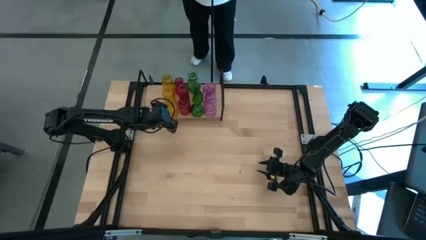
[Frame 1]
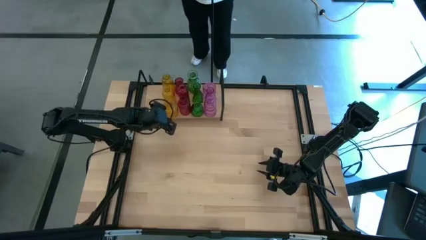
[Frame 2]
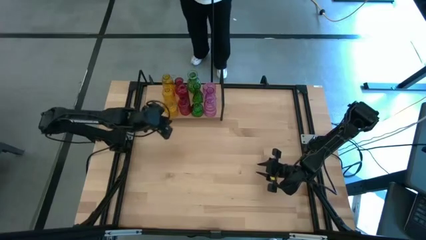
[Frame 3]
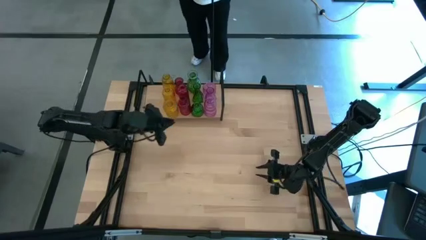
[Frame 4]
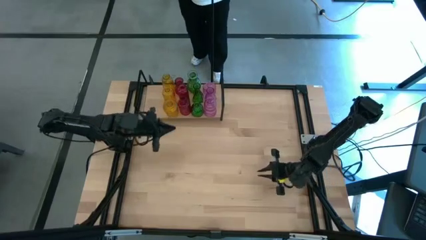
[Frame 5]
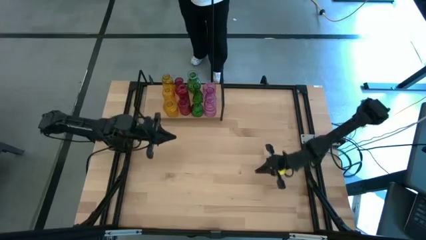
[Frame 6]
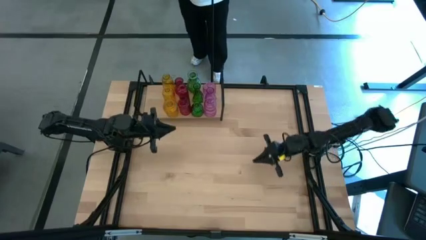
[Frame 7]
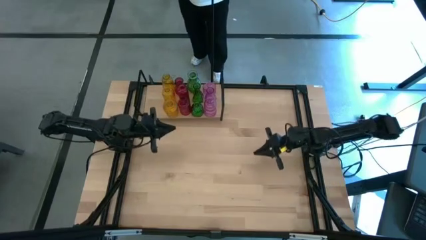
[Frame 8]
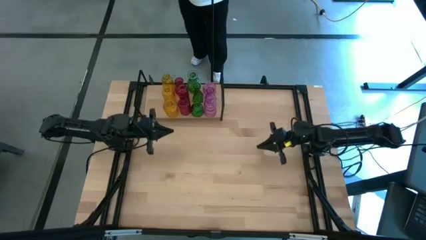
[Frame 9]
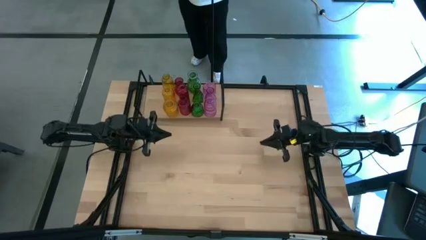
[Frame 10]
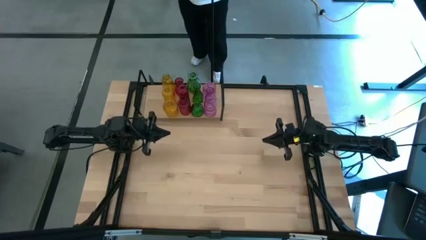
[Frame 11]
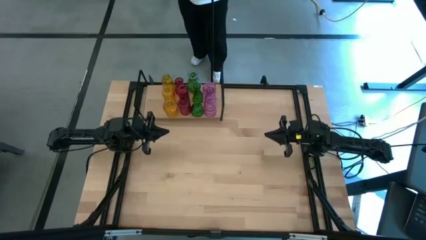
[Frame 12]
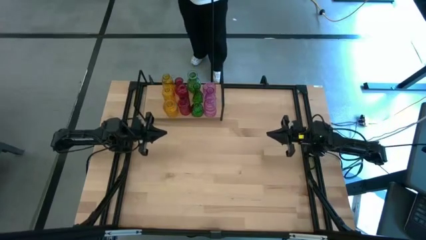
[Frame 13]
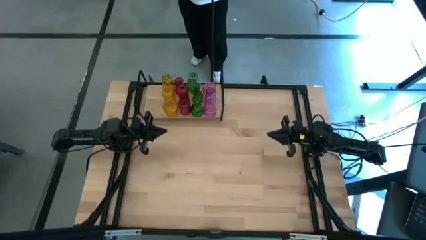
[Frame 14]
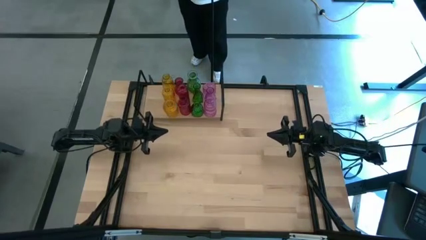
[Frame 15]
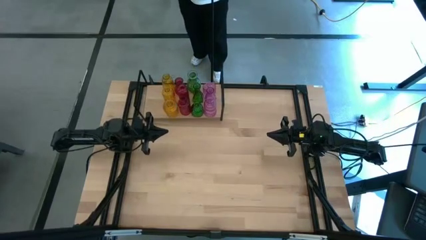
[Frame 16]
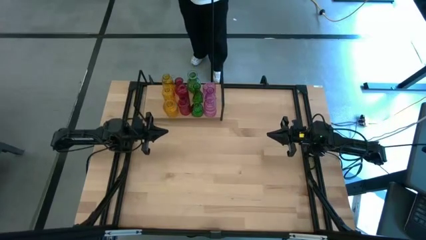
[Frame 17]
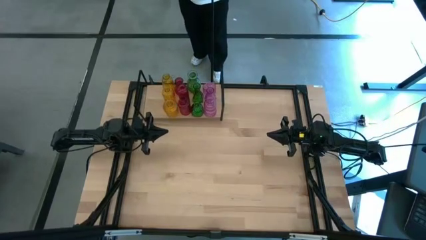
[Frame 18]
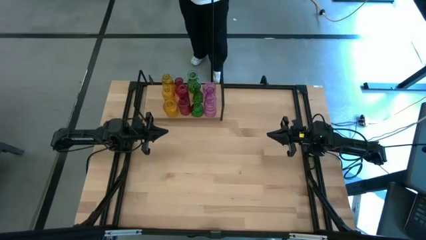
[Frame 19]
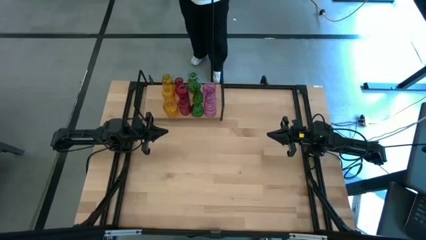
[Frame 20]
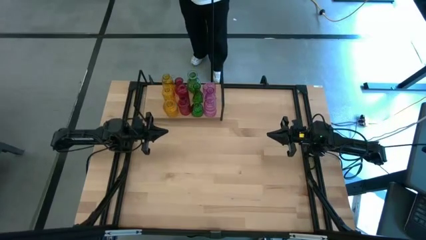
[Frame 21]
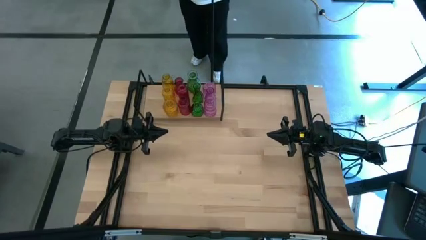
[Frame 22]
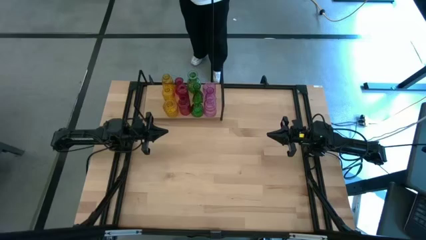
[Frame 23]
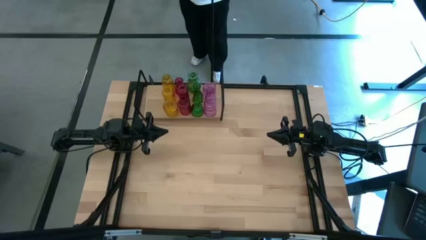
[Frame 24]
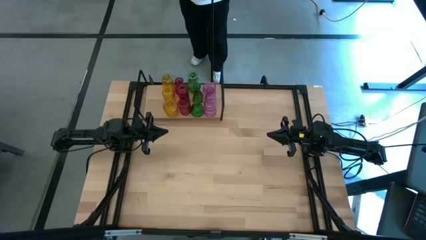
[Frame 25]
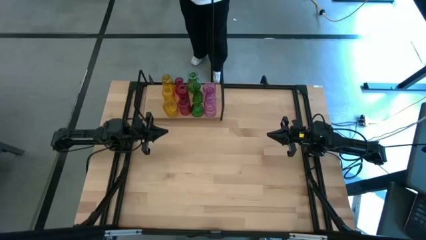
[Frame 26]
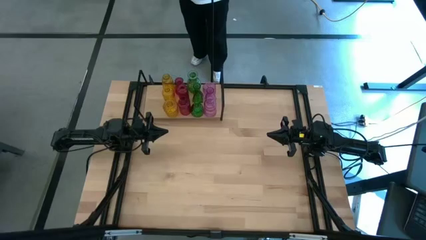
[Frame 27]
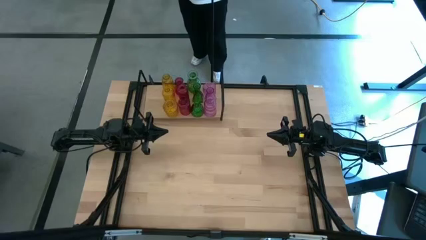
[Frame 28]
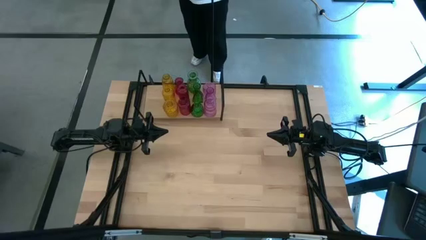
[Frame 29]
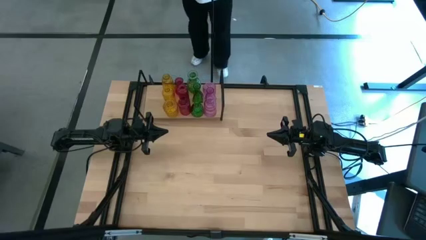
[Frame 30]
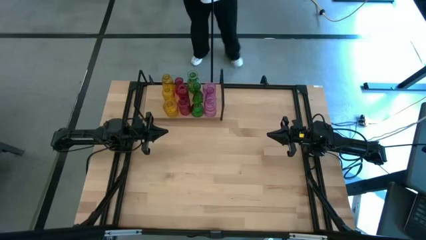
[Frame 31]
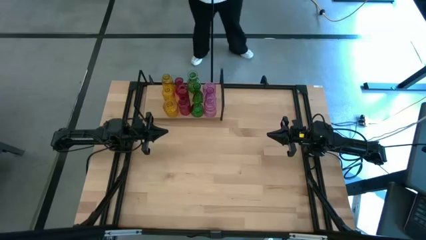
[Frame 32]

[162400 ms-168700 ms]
Task: sort vases onto shelf
Return to Home Position

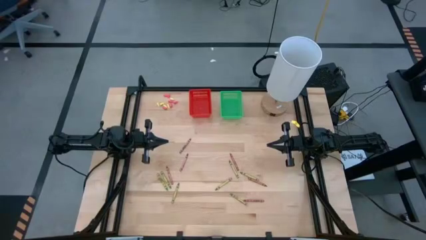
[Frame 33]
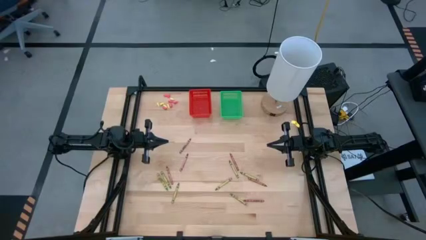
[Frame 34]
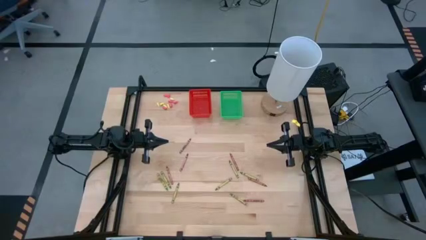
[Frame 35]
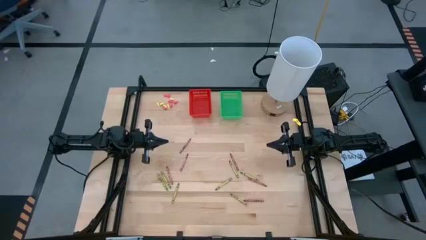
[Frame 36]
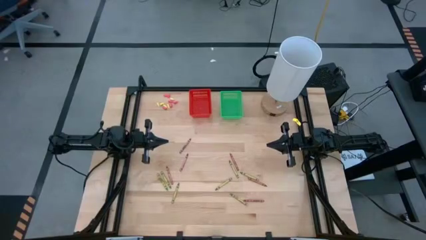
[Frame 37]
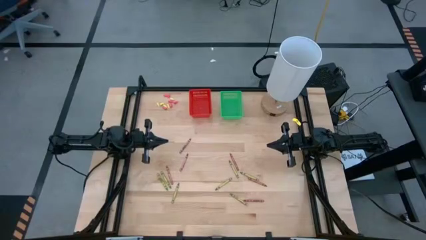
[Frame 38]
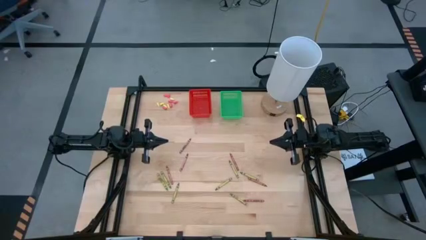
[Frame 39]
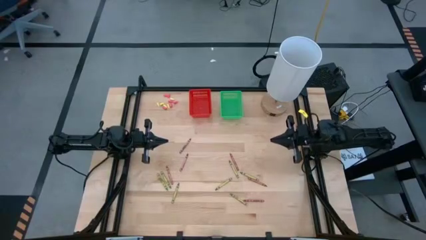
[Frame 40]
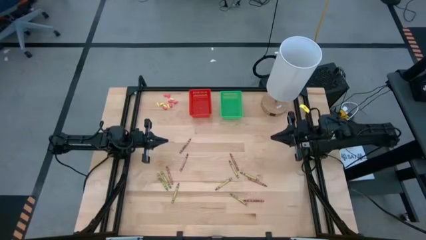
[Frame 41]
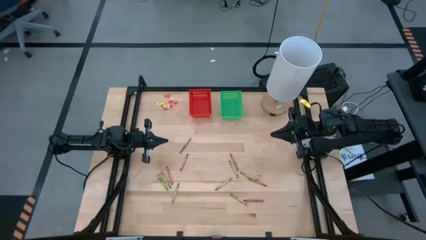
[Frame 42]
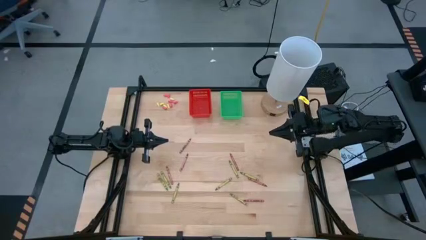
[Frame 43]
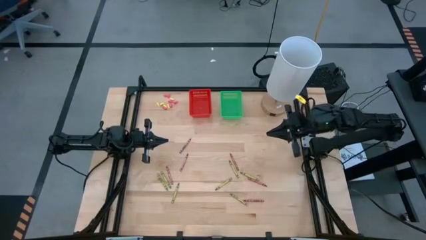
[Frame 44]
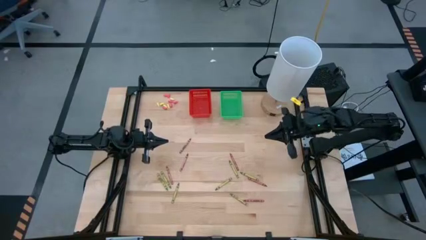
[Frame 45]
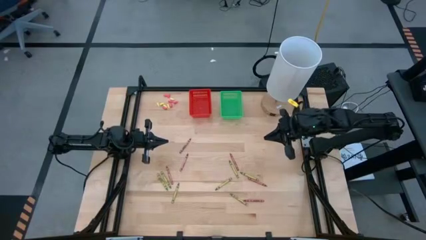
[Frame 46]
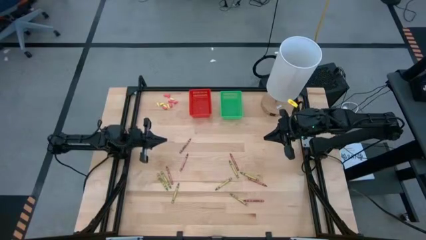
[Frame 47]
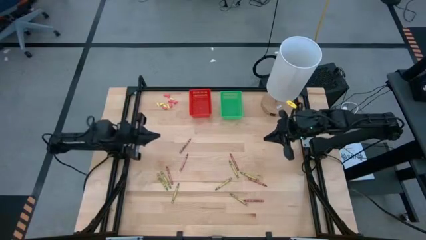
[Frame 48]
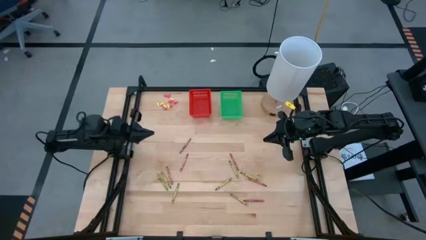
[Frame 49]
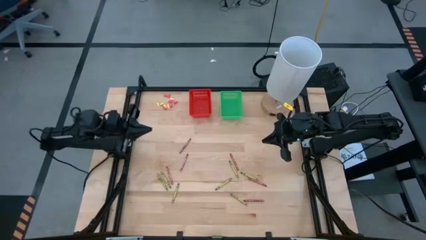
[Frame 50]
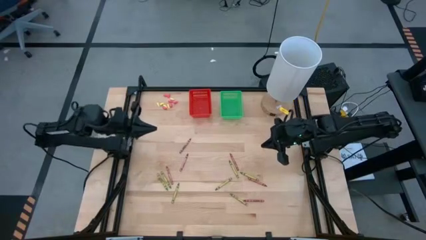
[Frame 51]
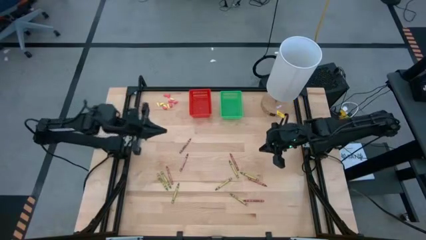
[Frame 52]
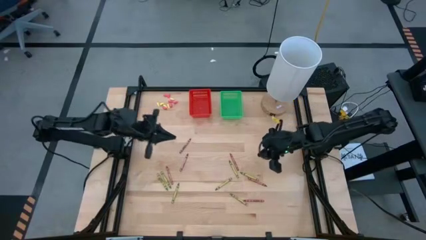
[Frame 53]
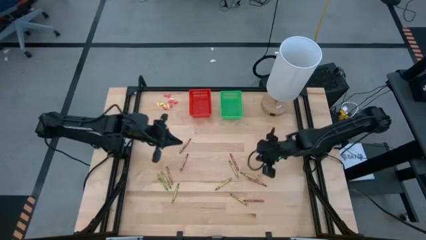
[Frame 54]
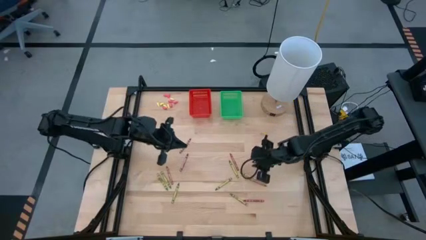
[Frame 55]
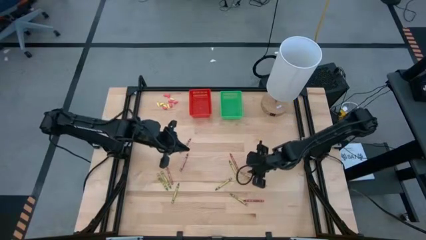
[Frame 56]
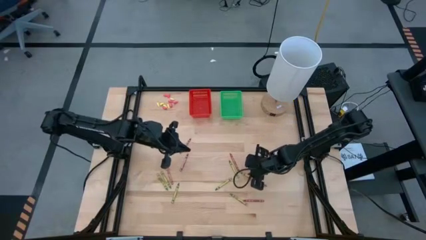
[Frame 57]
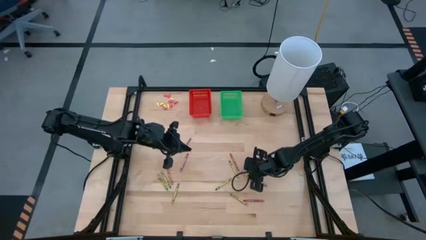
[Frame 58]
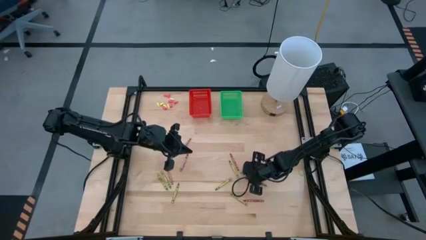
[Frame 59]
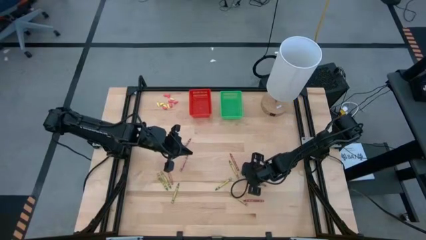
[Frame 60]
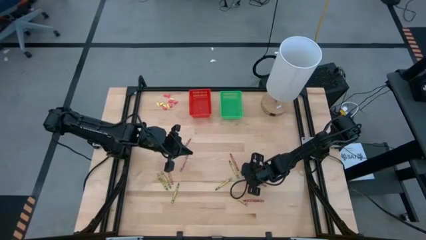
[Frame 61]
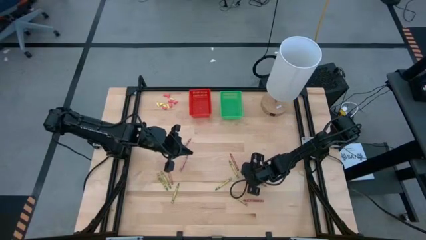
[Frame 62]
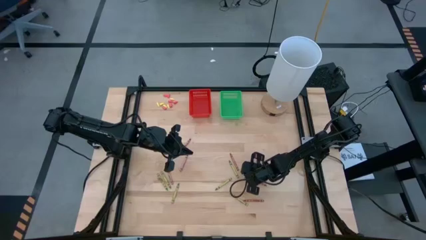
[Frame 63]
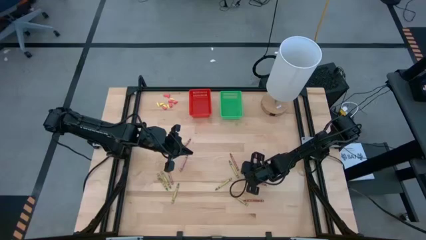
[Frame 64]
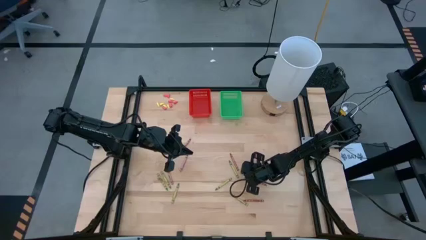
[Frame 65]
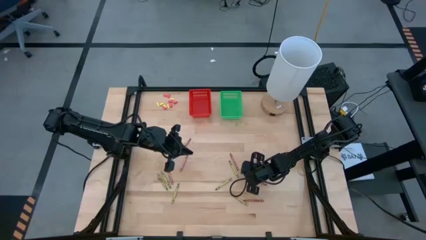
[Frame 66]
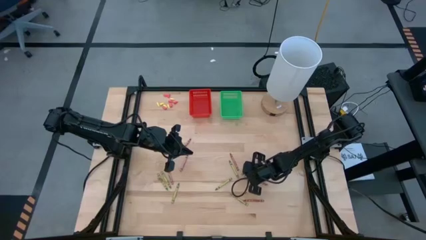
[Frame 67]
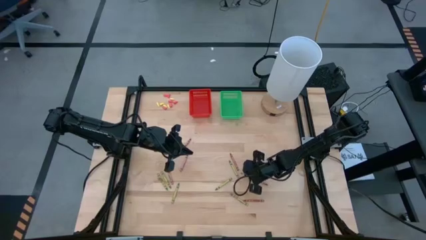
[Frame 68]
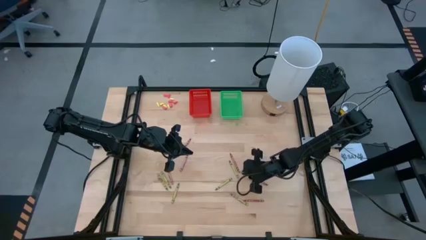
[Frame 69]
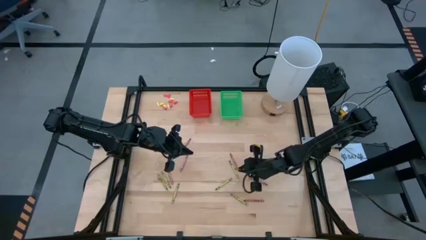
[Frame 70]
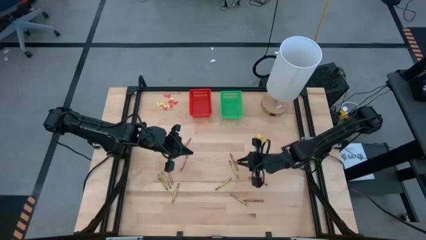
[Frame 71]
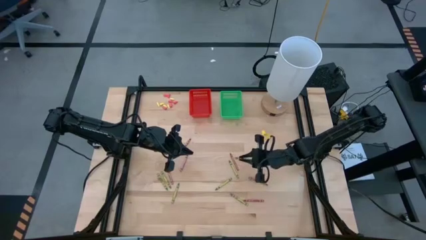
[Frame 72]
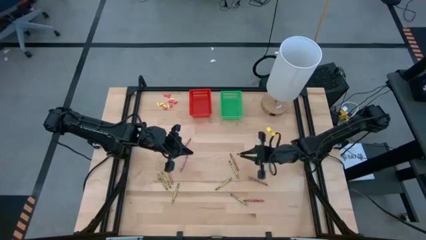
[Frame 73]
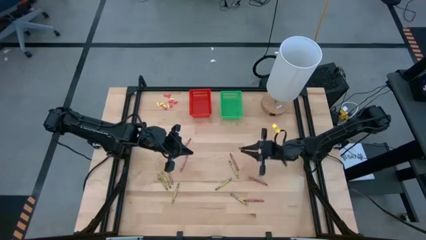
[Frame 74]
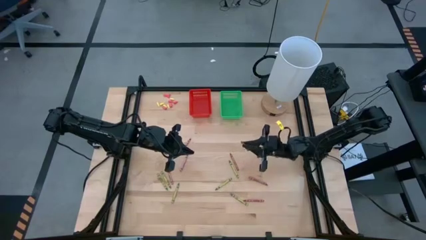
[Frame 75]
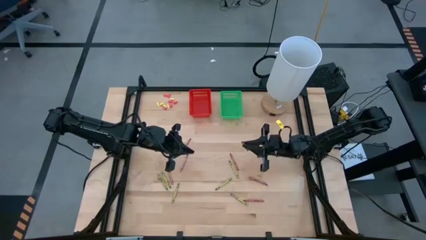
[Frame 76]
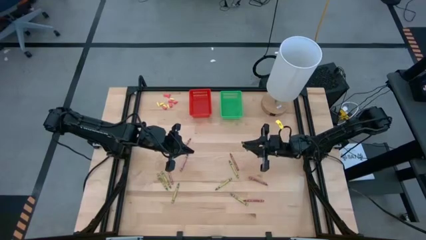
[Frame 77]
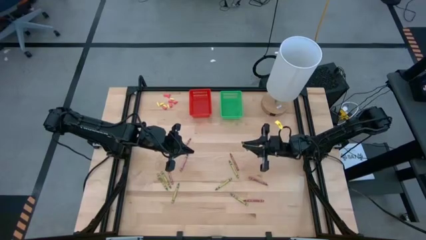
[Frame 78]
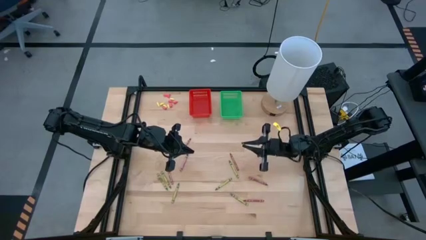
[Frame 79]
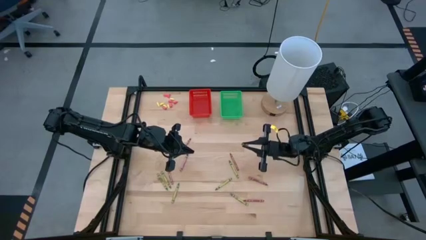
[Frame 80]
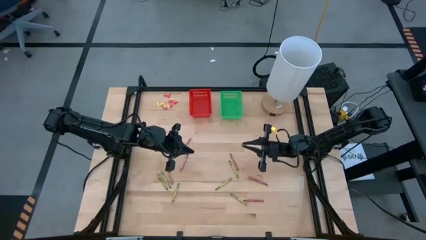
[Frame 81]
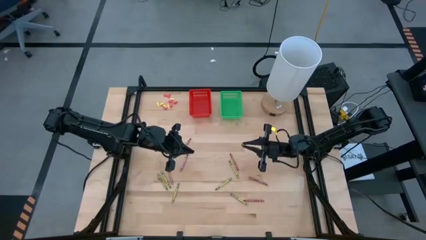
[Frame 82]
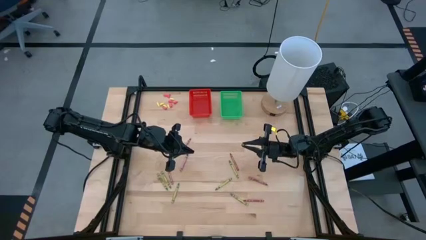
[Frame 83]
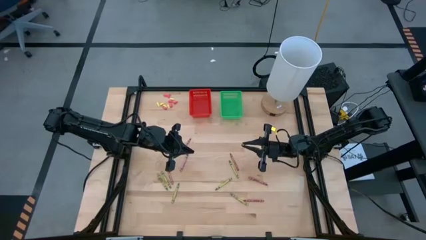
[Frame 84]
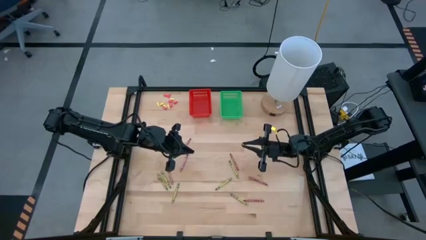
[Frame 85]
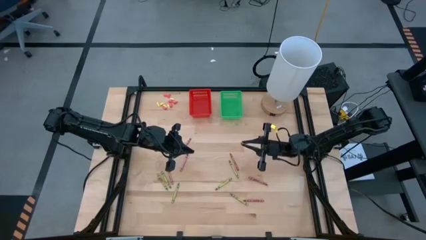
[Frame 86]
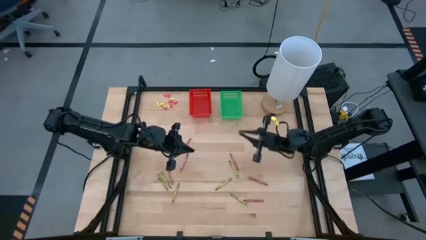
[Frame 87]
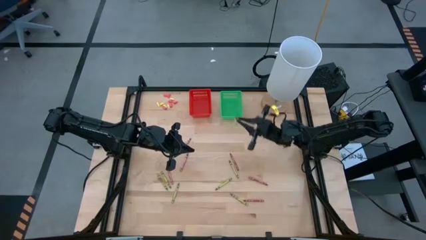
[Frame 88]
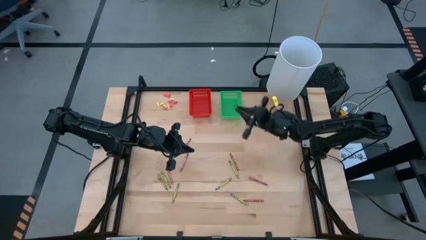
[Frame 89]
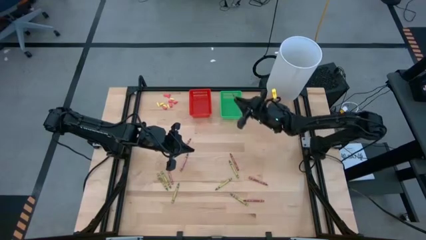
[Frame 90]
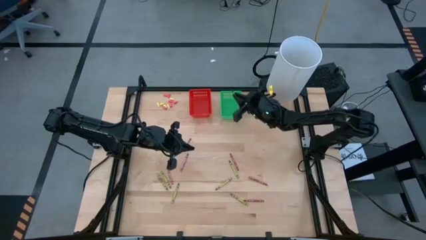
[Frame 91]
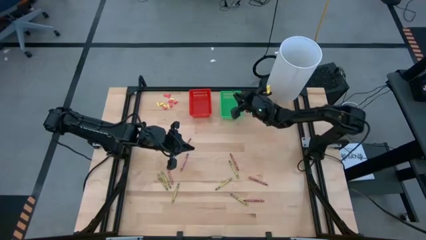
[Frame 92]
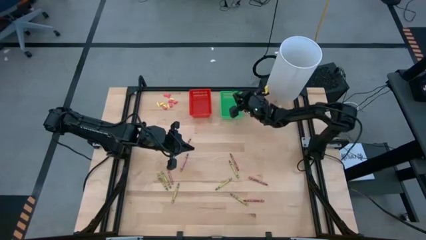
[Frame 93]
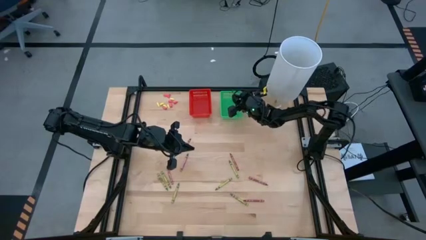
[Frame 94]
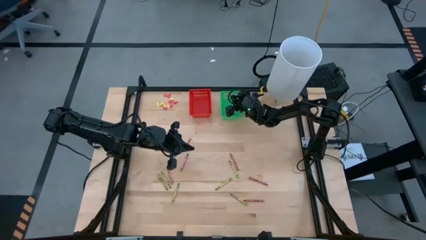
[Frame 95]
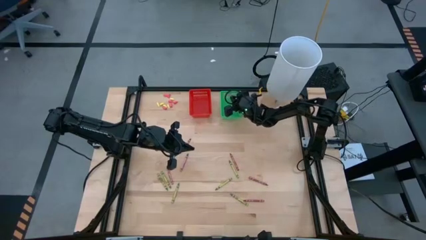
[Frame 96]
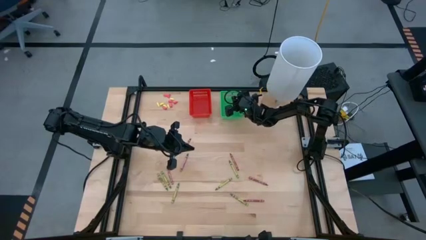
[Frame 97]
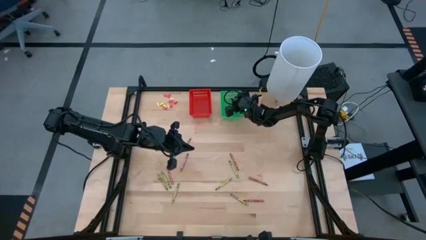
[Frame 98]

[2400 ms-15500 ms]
Task: Sort crayons
Put the green crayon into the green bin
